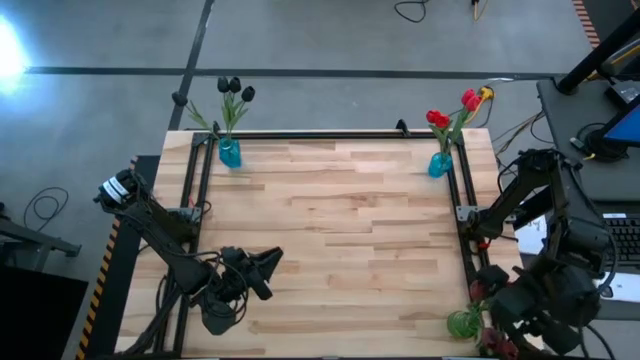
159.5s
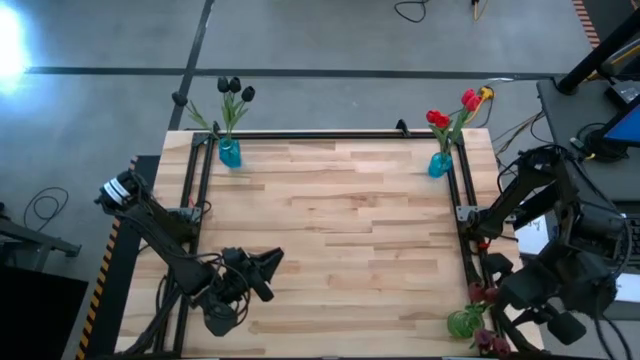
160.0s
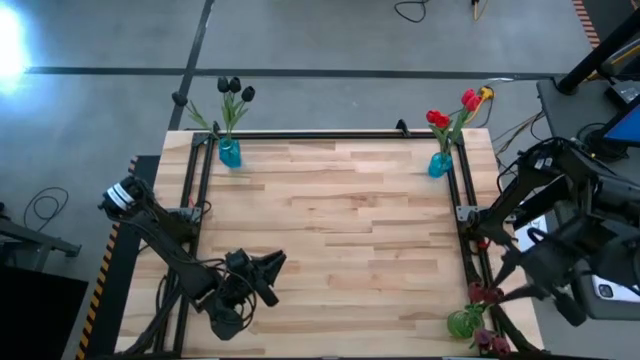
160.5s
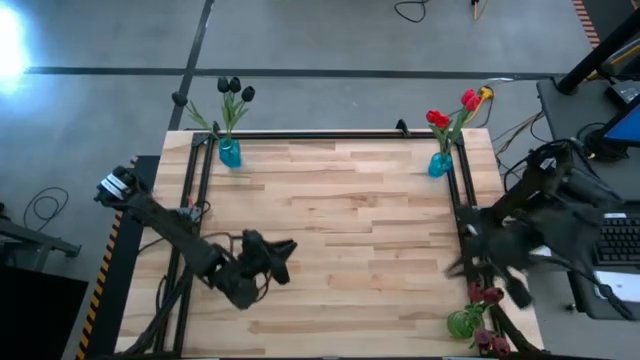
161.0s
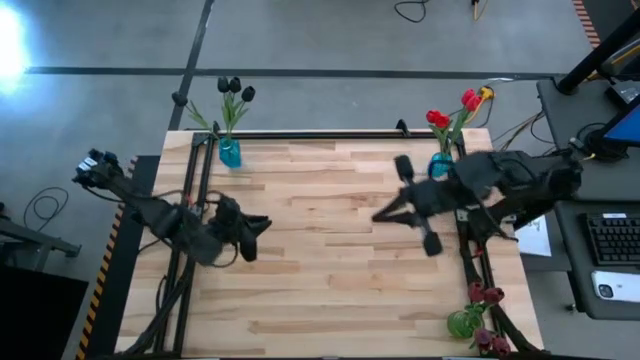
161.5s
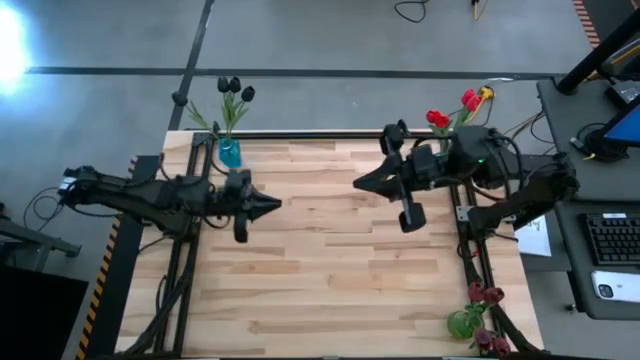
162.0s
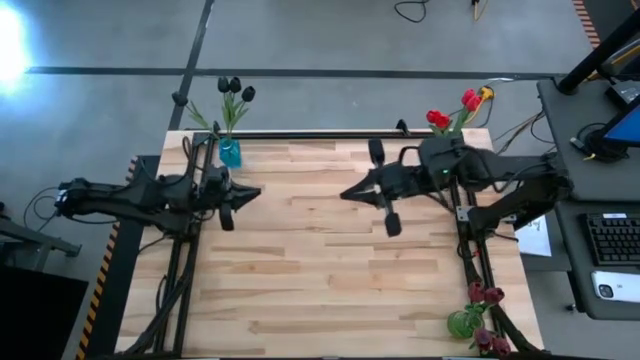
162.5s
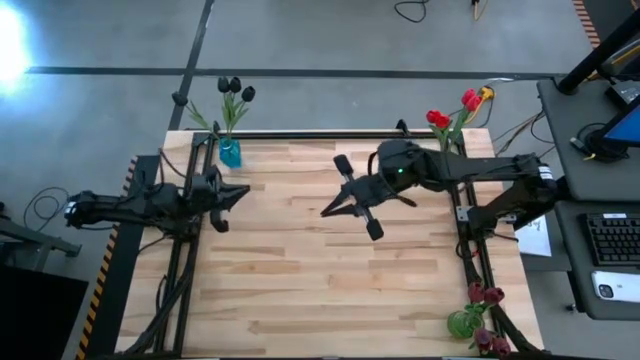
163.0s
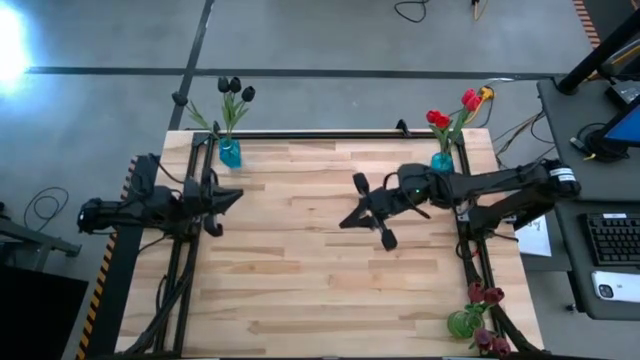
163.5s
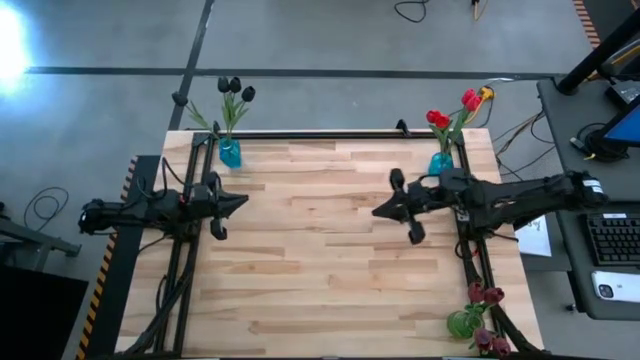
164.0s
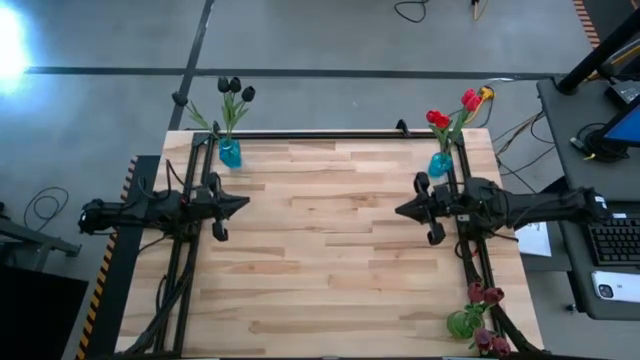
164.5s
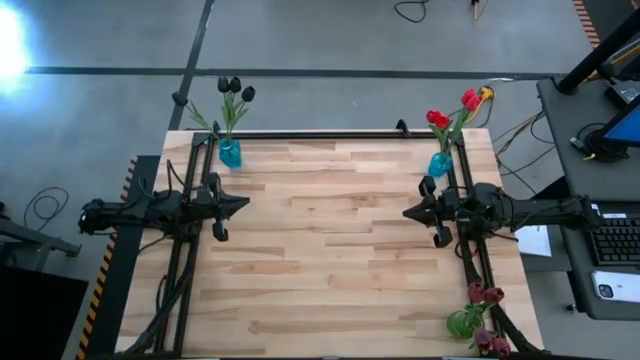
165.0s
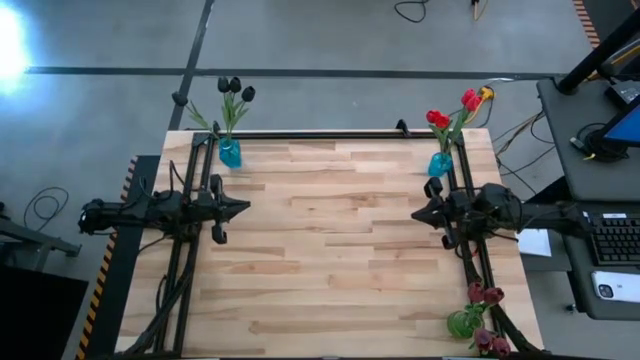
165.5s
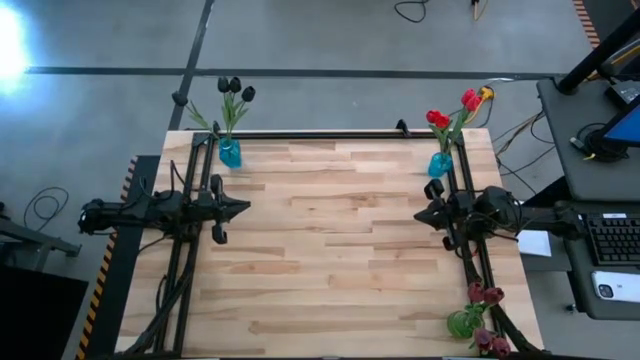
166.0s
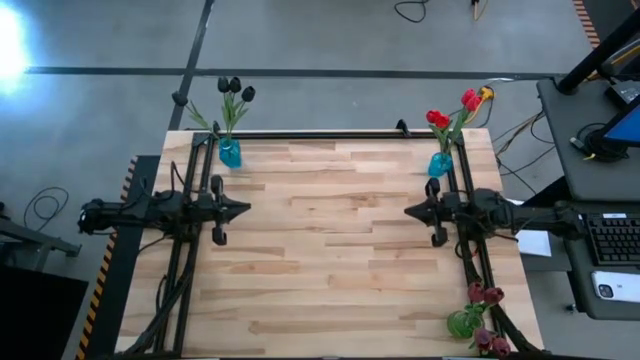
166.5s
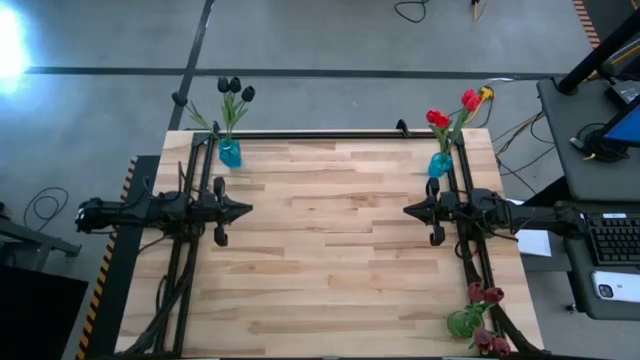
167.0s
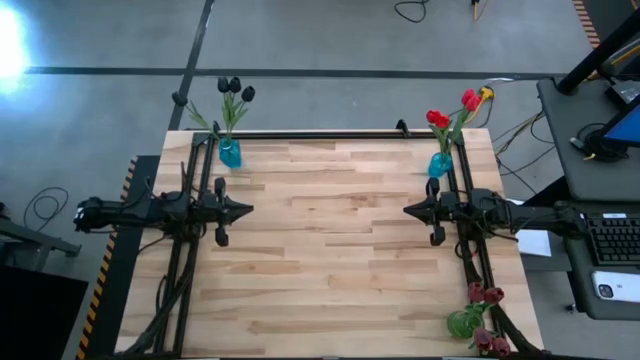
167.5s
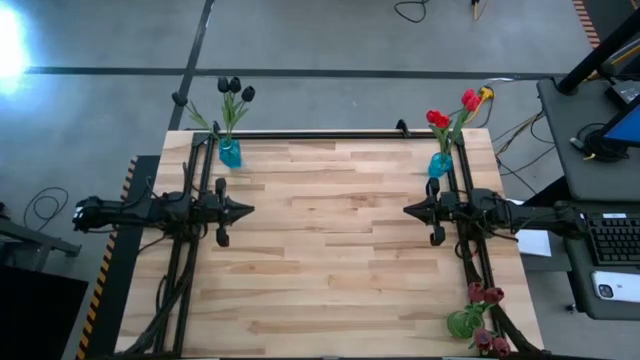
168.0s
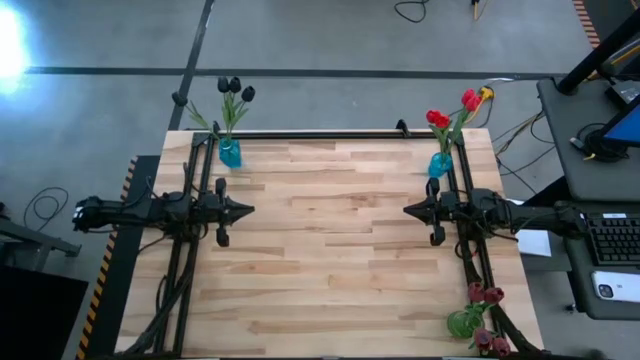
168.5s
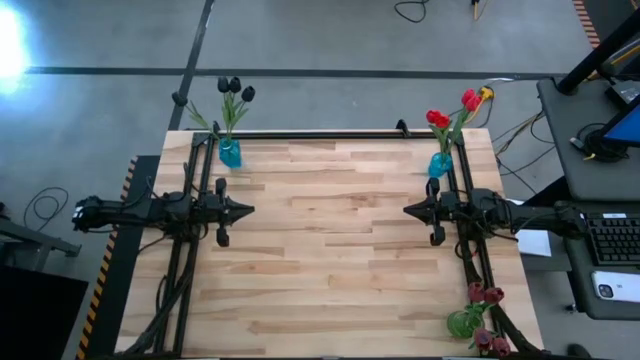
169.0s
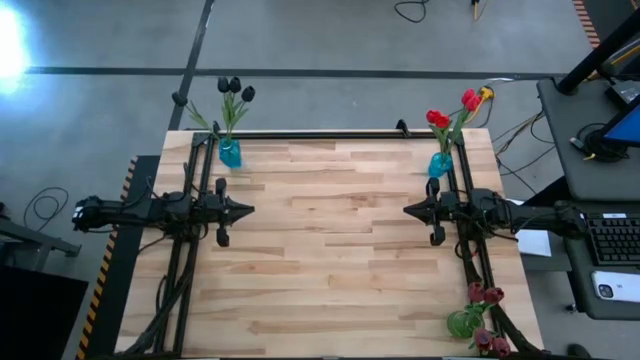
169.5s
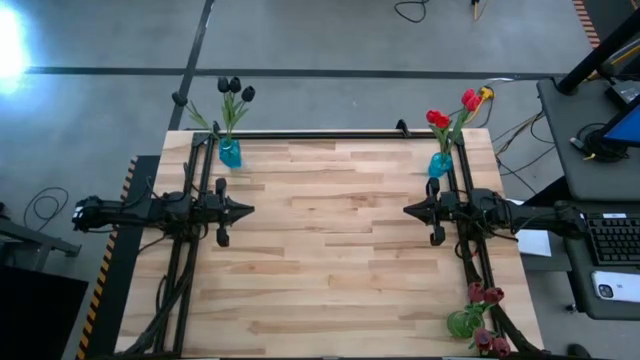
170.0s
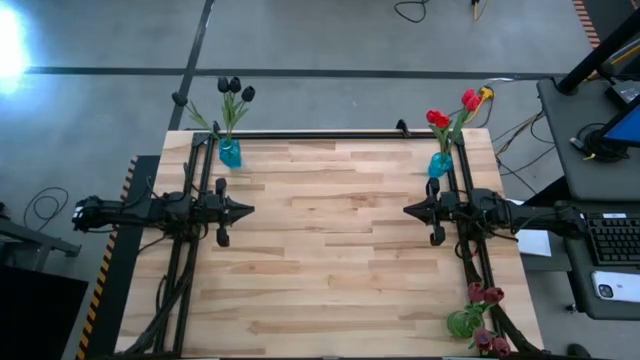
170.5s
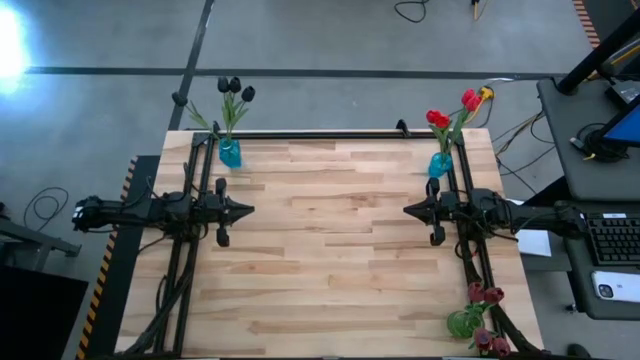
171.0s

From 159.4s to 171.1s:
Task: Sort flowers into vase by color
Return to Home Position

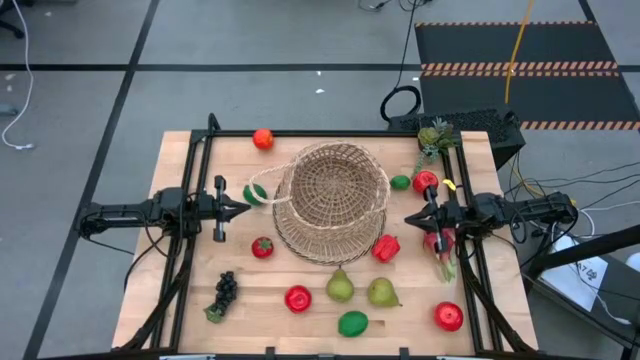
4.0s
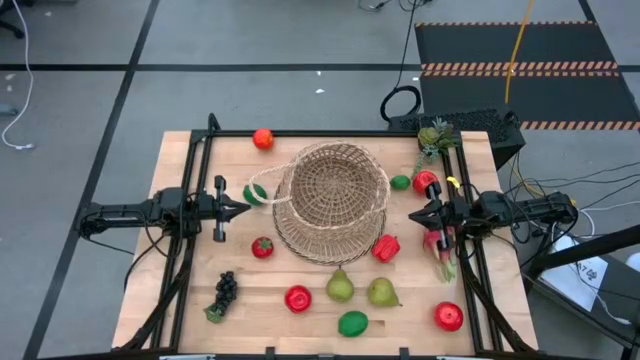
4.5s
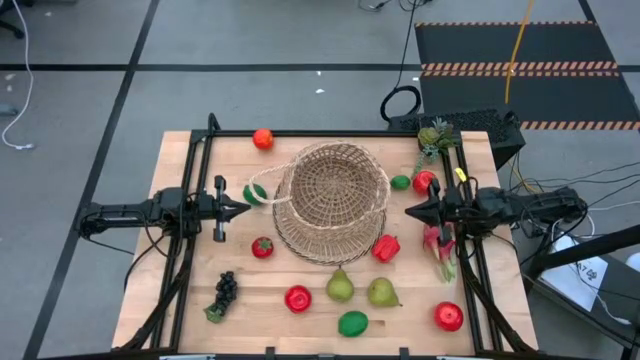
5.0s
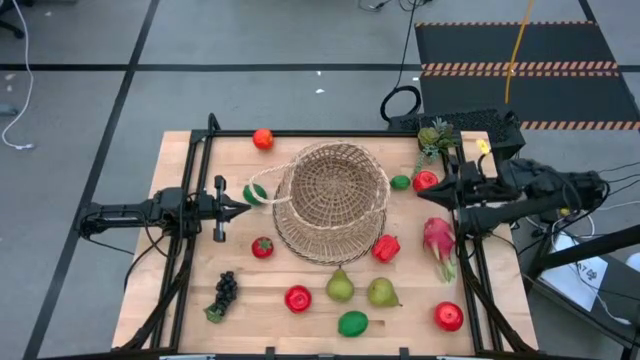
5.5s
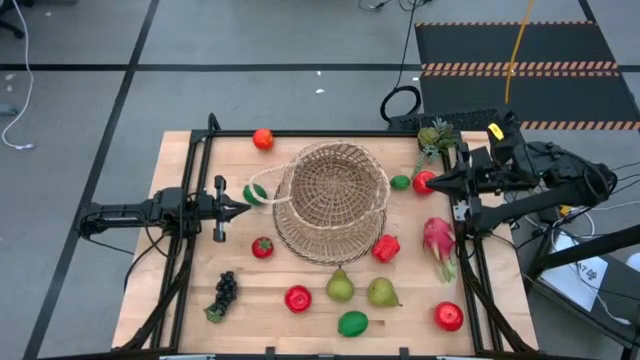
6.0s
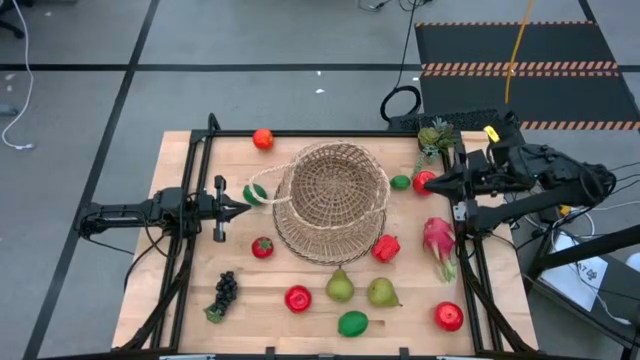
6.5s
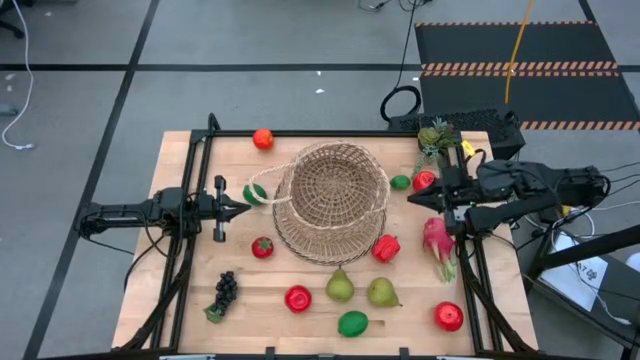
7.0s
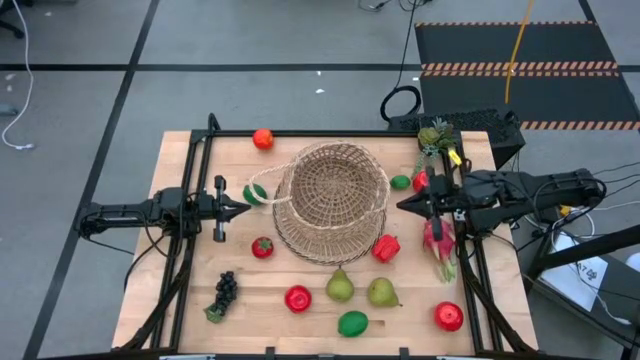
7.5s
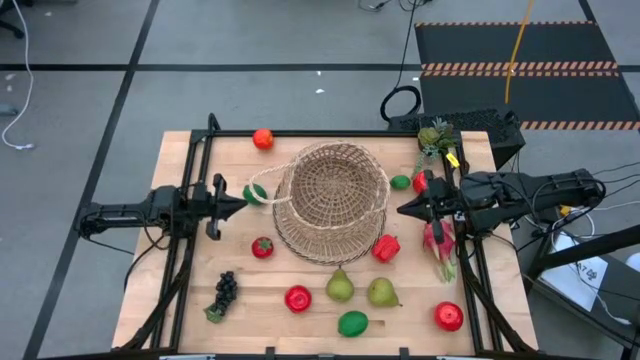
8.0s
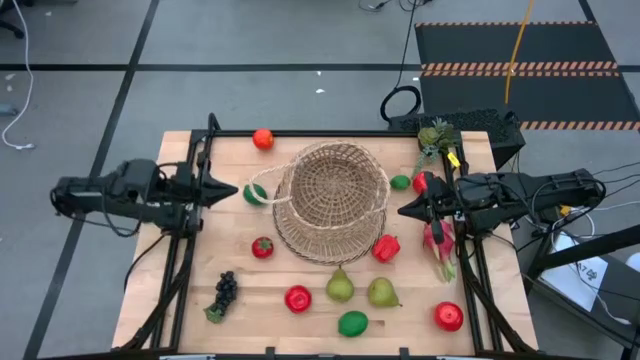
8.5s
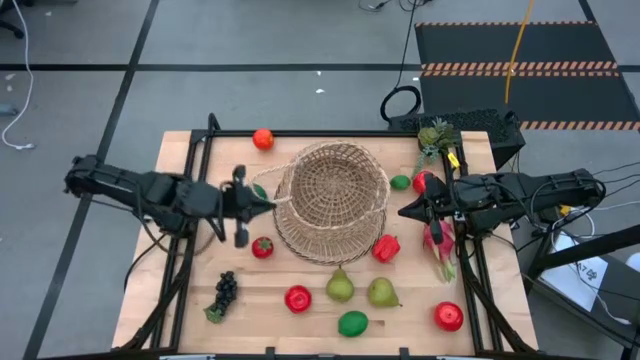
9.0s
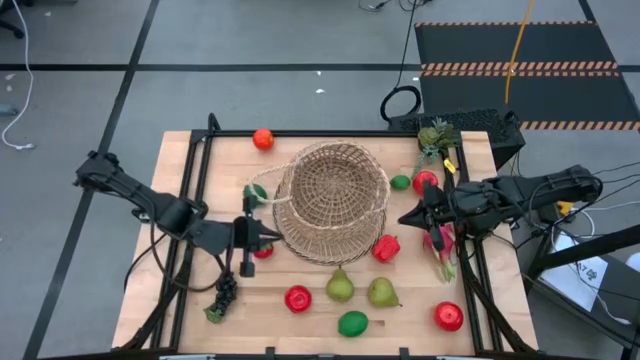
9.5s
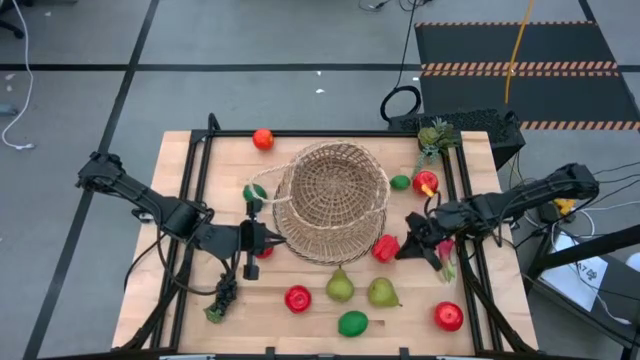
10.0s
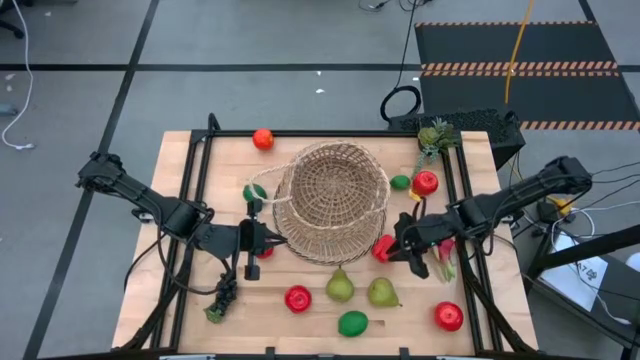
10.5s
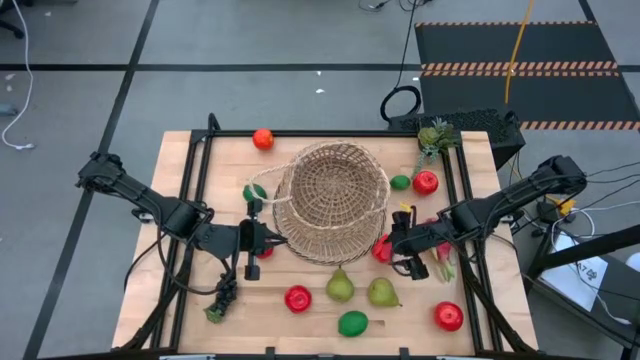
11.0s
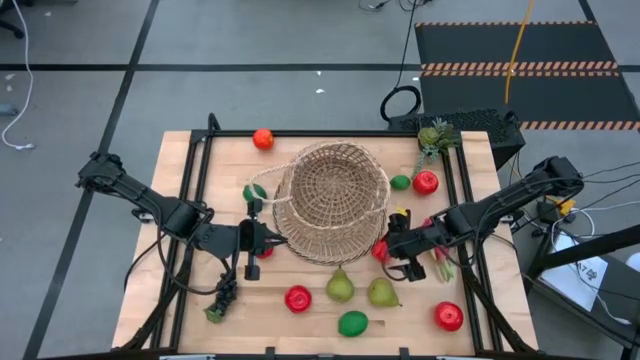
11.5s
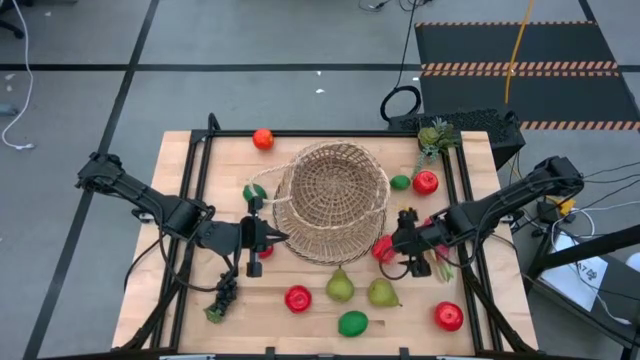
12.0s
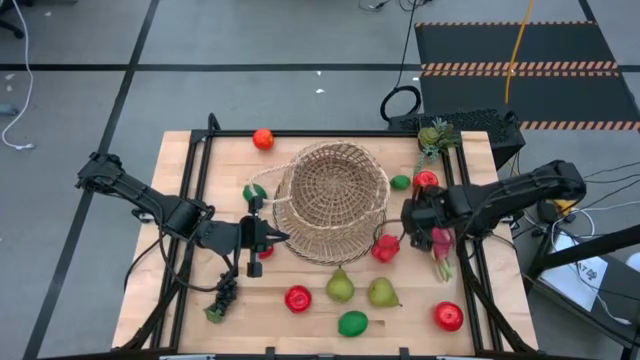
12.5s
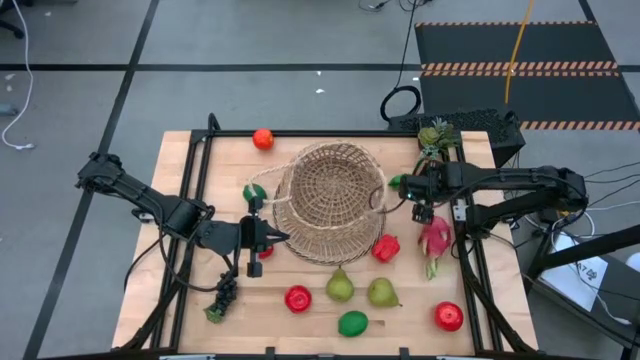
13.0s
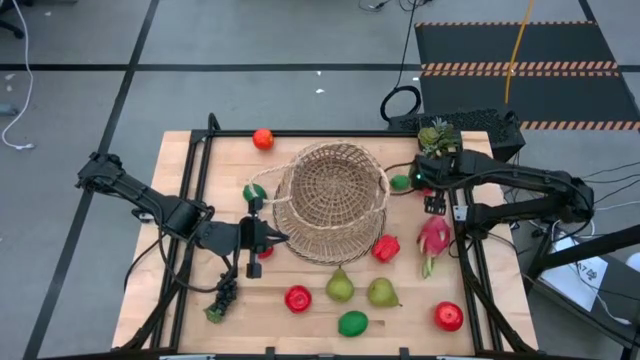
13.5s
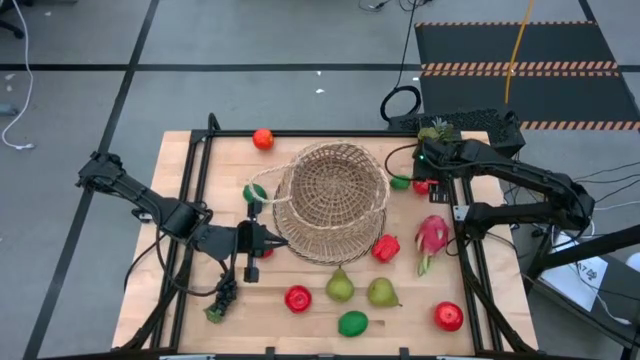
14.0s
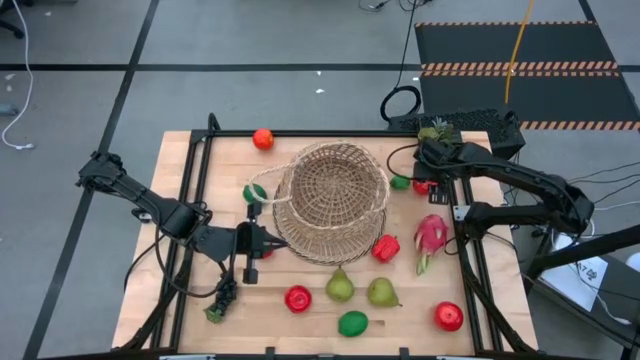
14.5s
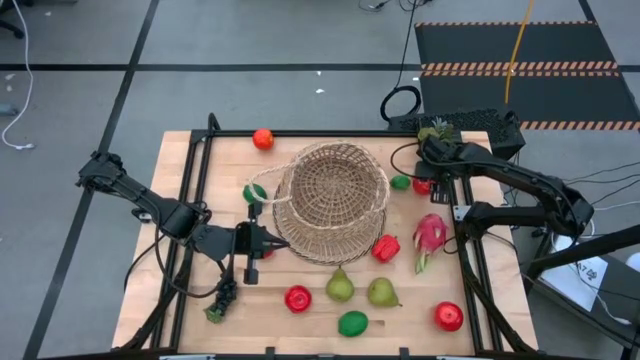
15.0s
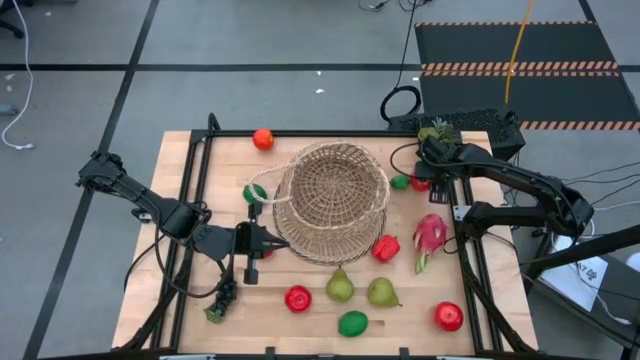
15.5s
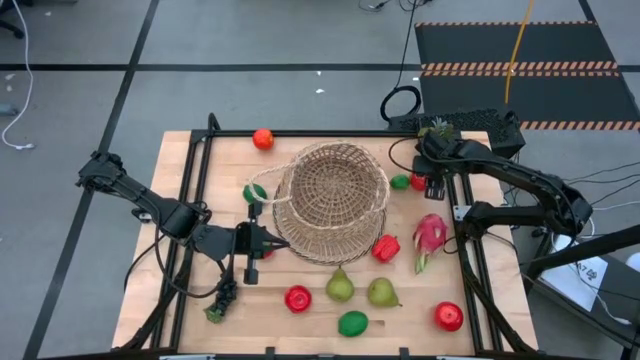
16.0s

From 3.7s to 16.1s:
Task: Build produce basket
Put the top right red apple into the basket
